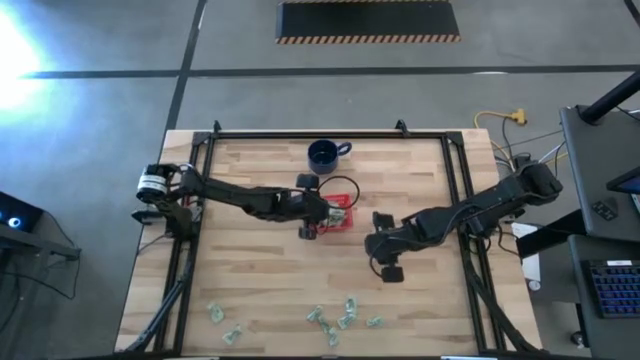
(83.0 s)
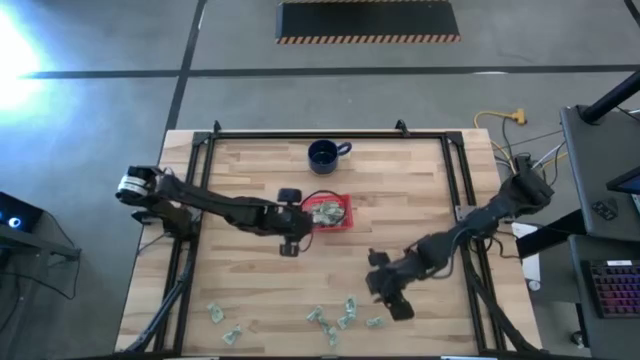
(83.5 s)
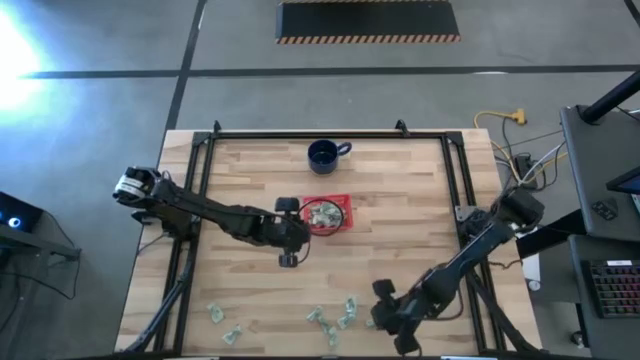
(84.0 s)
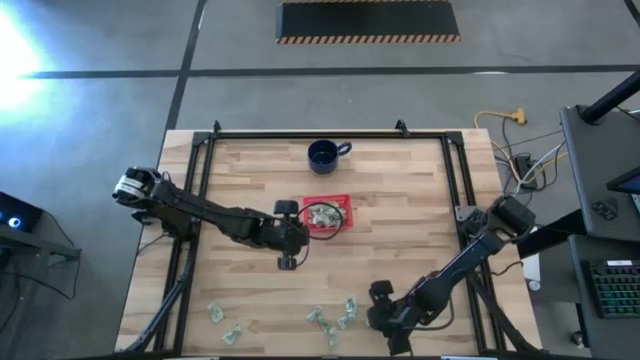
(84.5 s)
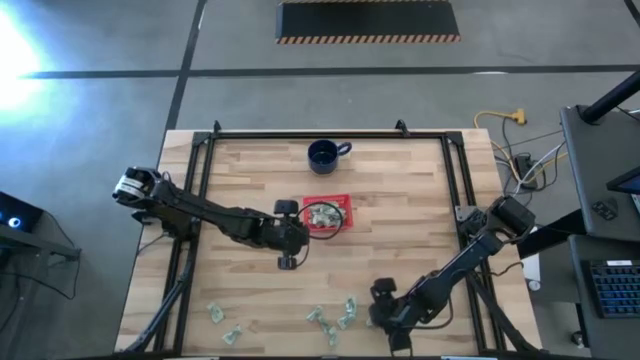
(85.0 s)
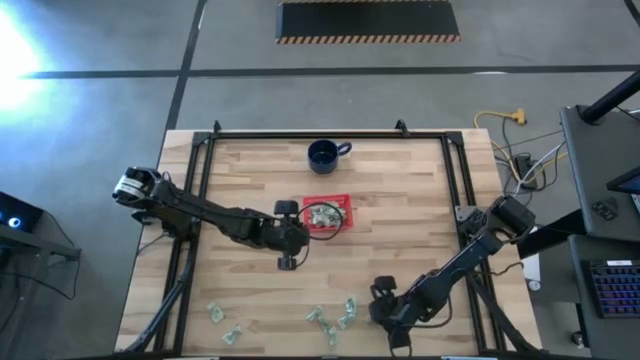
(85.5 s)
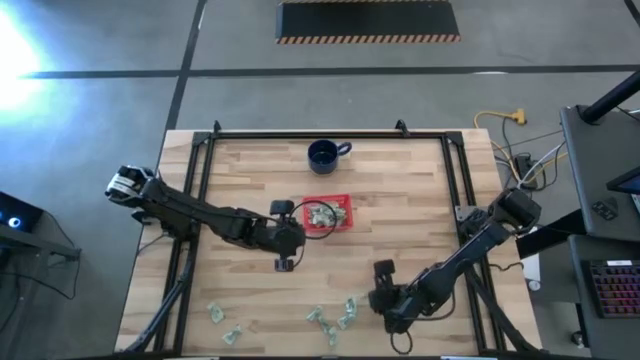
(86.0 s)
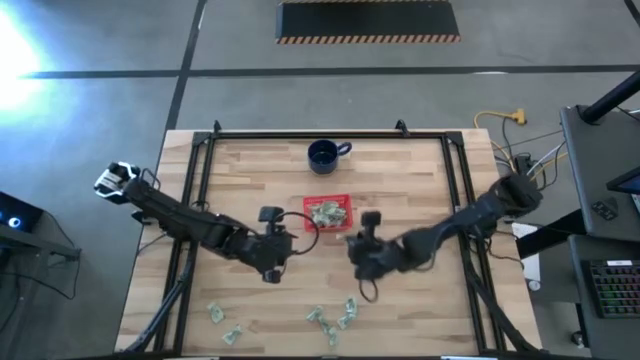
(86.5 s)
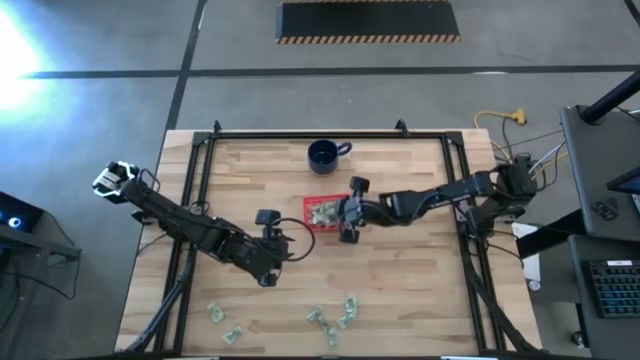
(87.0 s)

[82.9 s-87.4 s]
Task: Pick and place items into bin
Put the stevia packet into the red bin

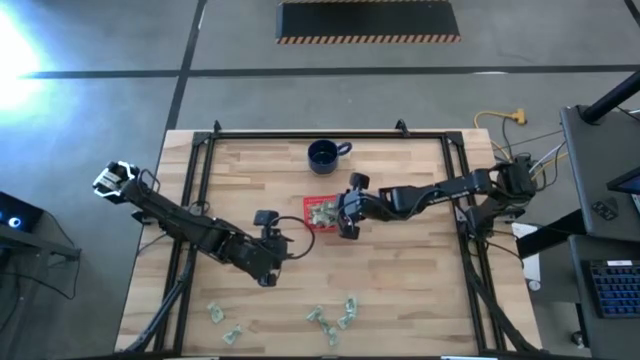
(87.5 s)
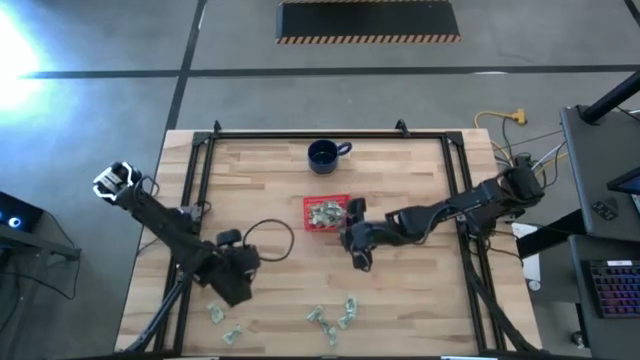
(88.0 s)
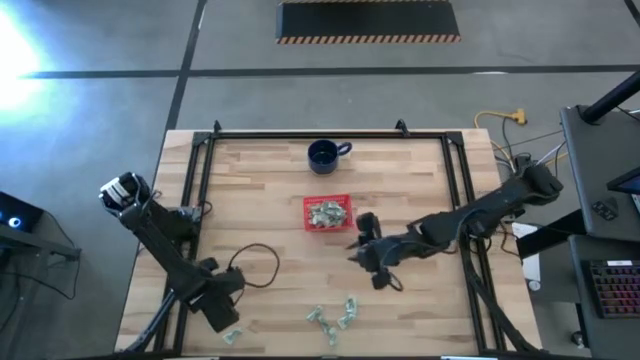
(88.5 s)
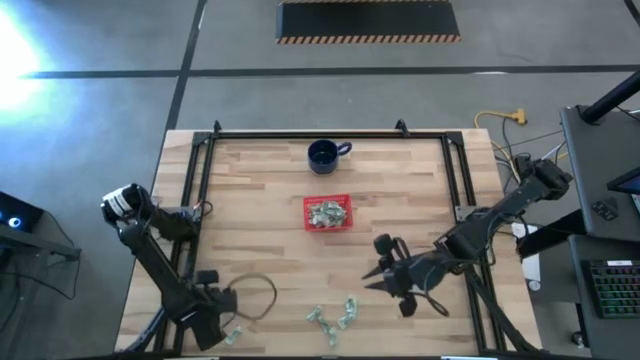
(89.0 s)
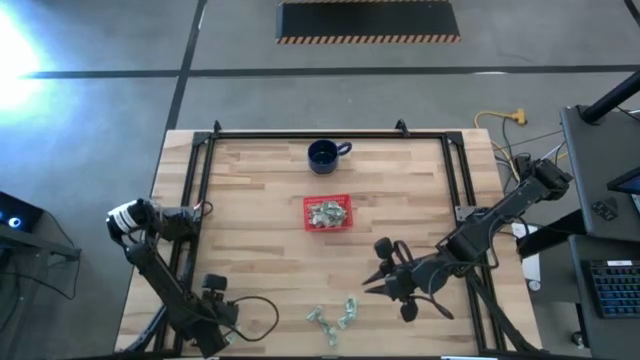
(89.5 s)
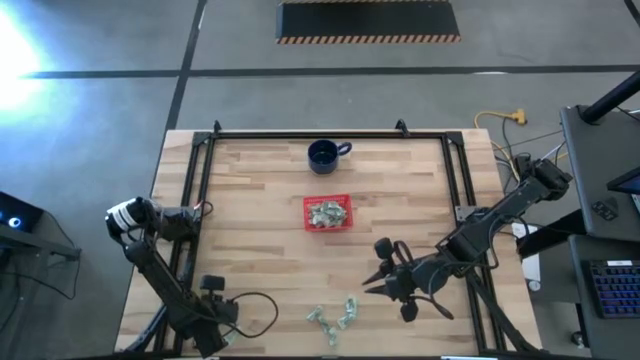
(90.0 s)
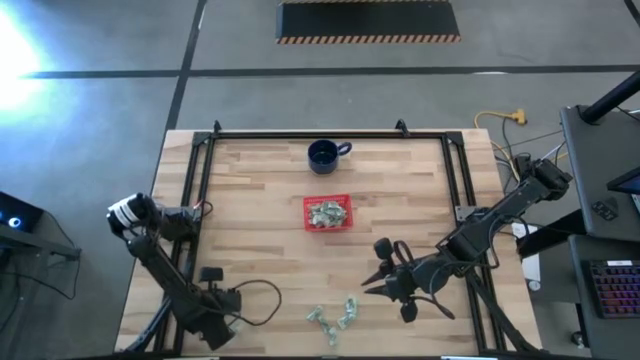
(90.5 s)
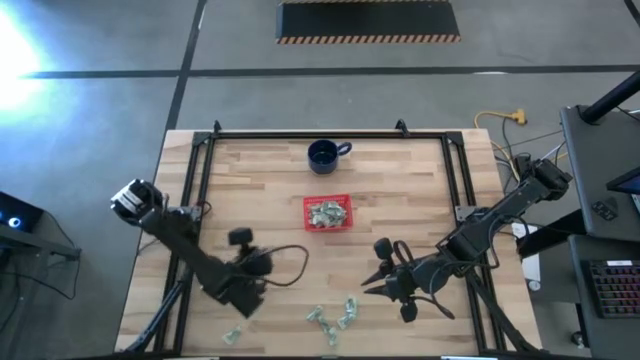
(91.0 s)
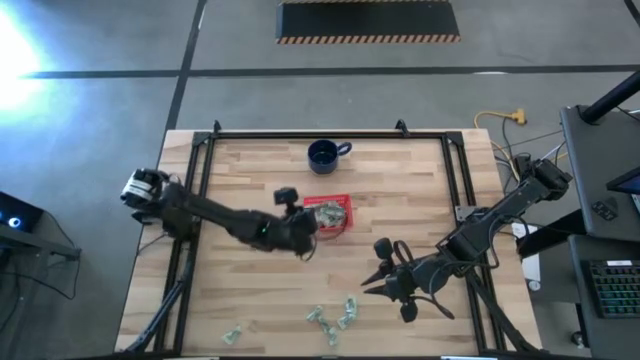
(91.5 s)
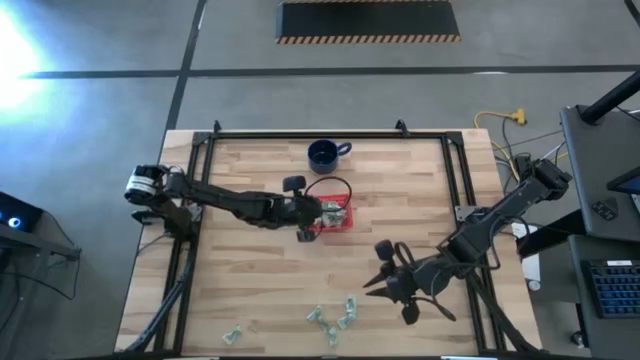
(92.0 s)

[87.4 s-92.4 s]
Put the stevia packet into the red bin

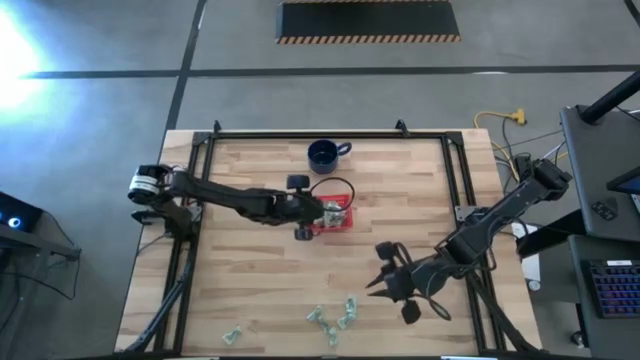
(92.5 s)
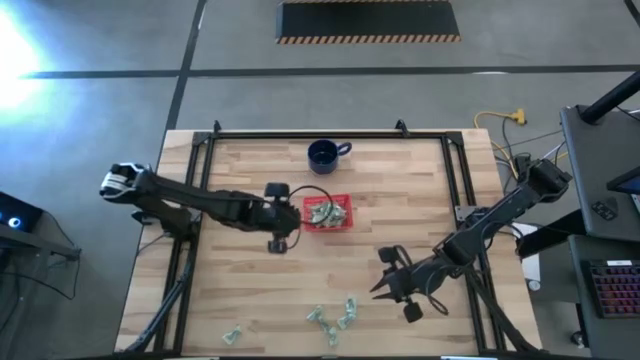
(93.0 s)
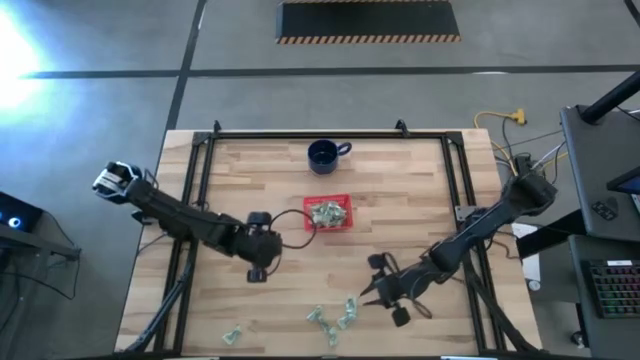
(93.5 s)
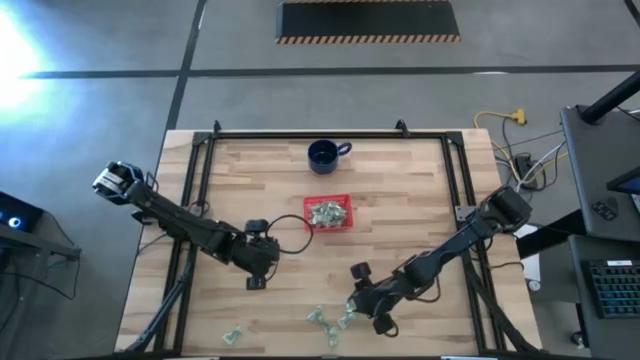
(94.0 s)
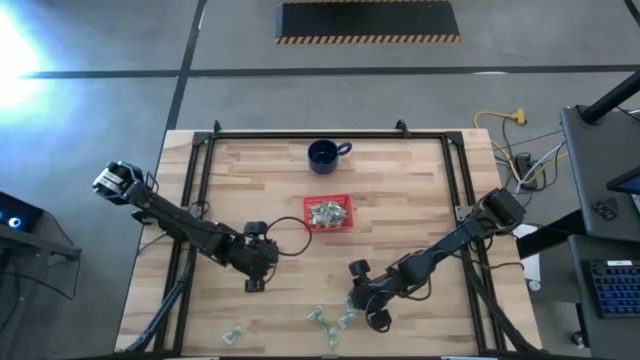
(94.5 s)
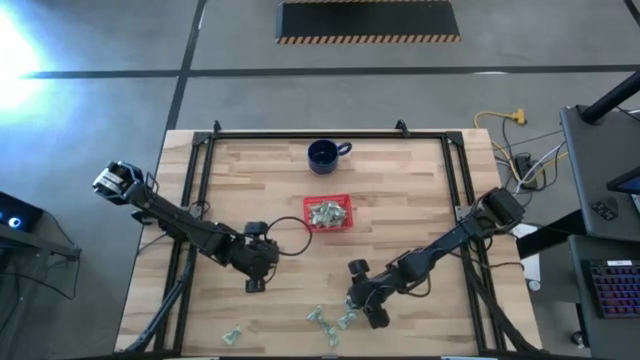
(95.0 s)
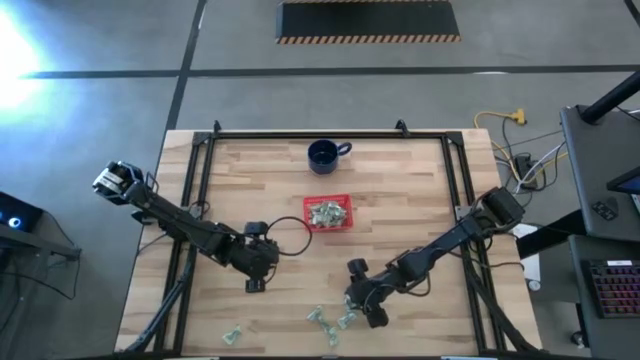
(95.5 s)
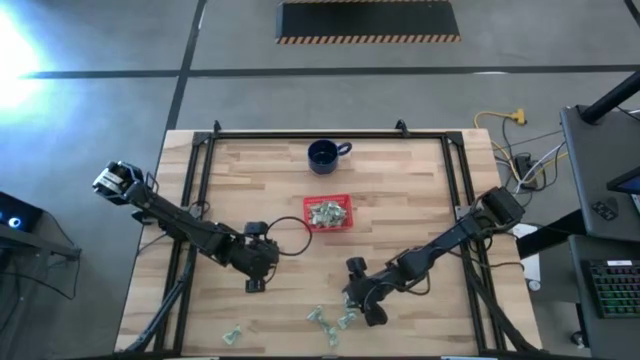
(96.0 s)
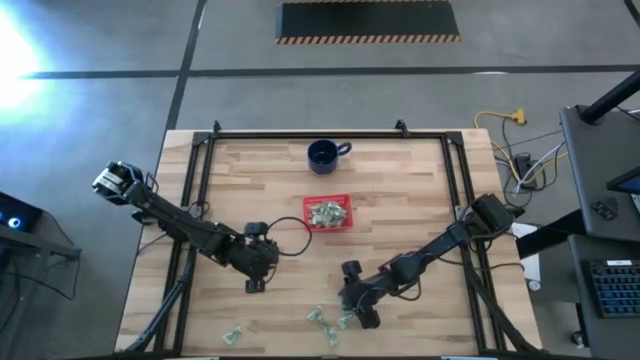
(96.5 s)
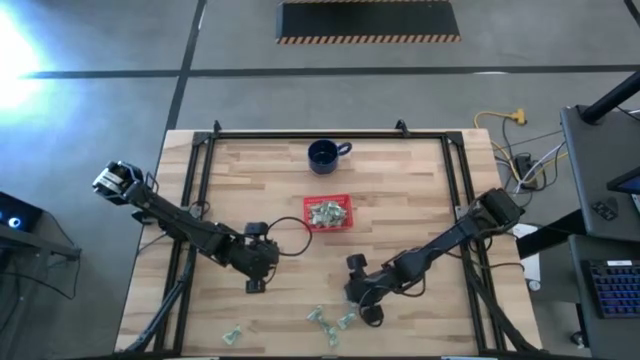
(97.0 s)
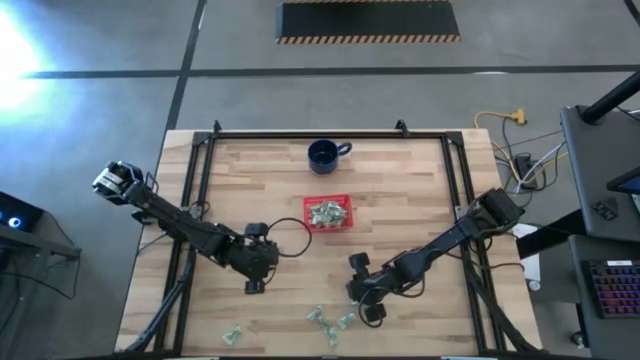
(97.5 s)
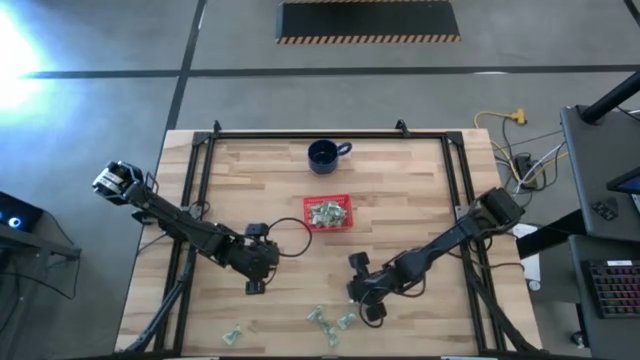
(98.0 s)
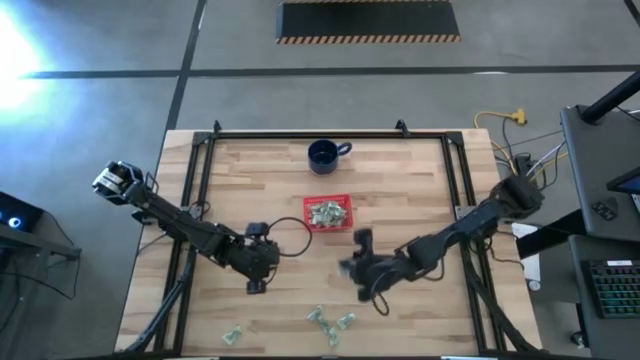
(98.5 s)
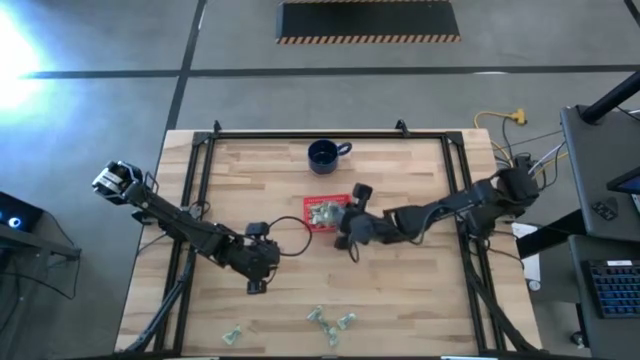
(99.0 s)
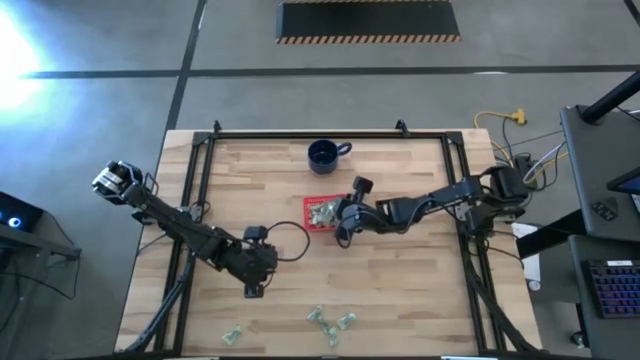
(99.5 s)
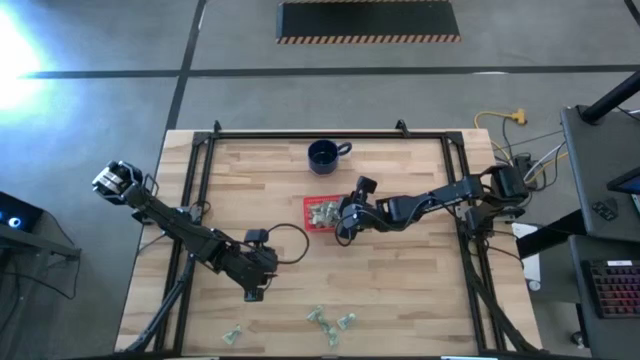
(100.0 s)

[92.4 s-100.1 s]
Put the stevia packet into the red bin

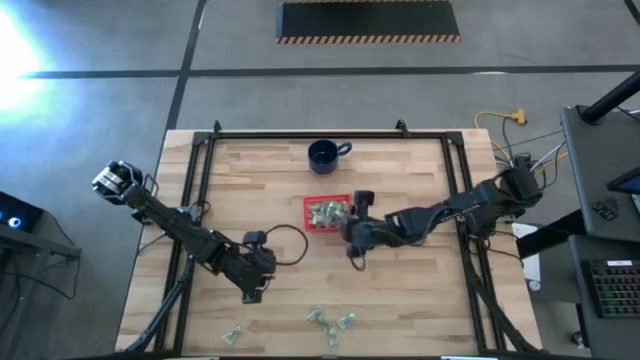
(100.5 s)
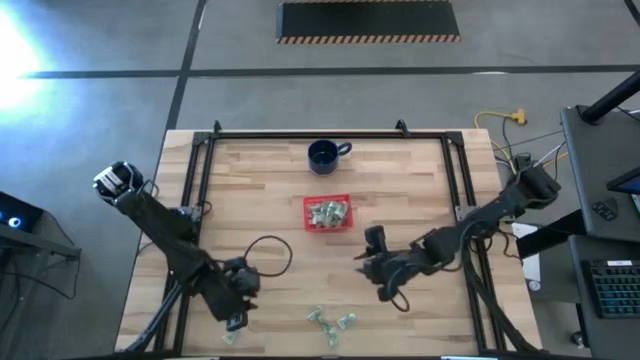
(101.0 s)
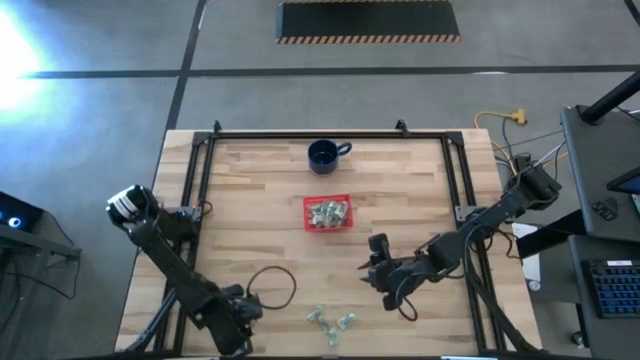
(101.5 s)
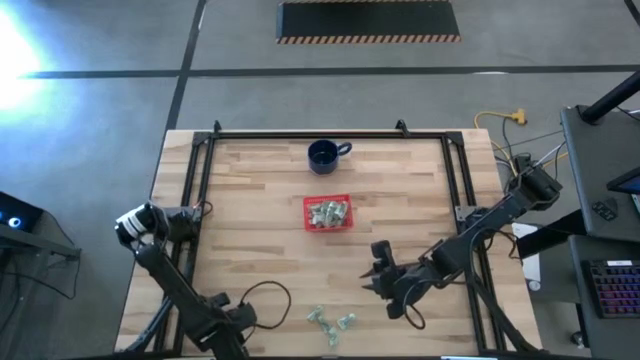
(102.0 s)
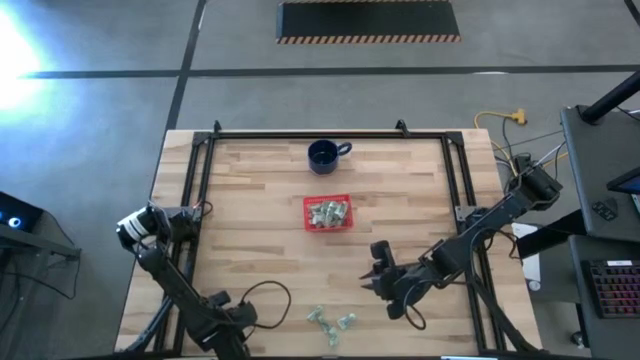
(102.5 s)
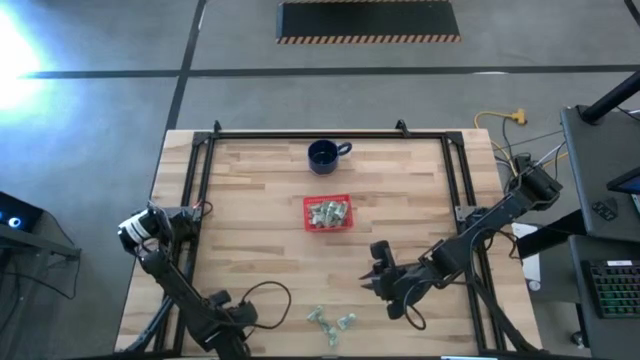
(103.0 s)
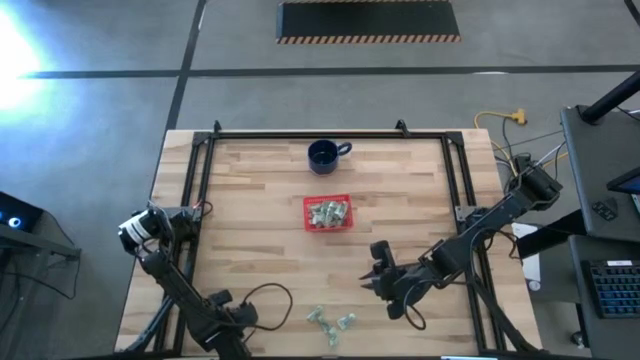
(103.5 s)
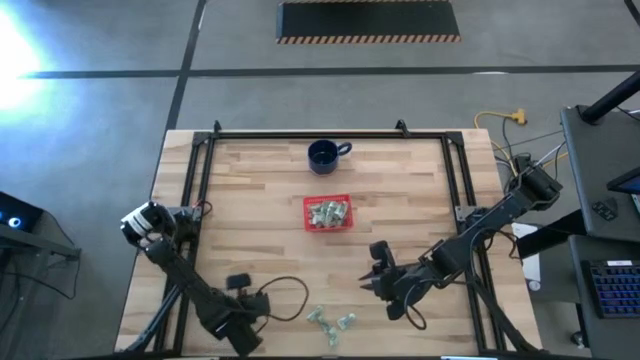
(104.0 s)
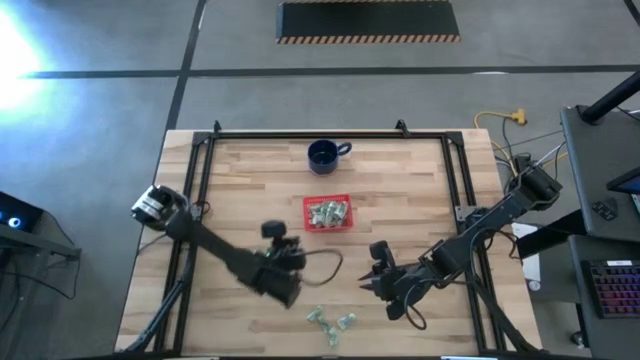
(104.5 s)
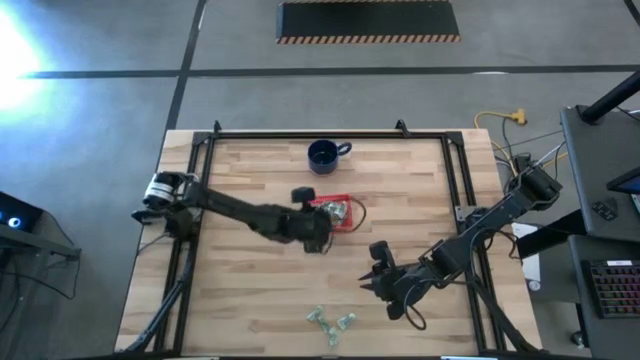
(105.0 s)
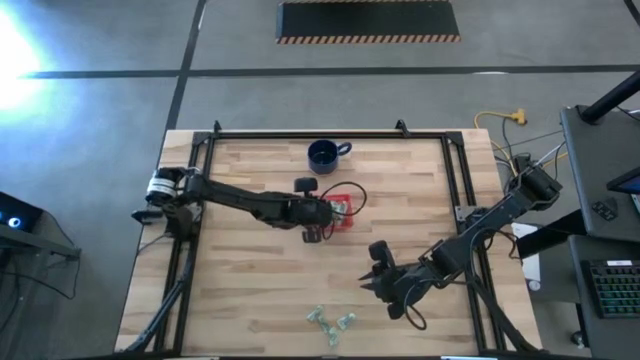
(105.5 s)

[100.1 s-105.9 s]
Put the stevia packet into the red bin
